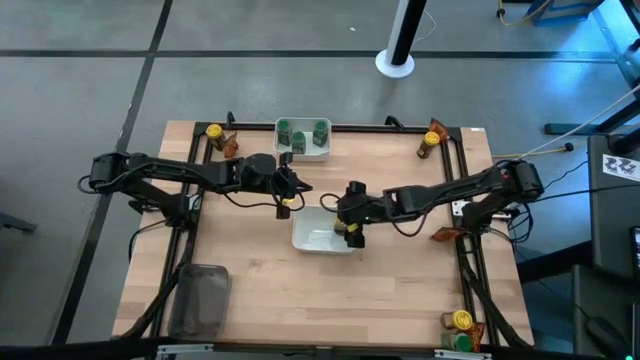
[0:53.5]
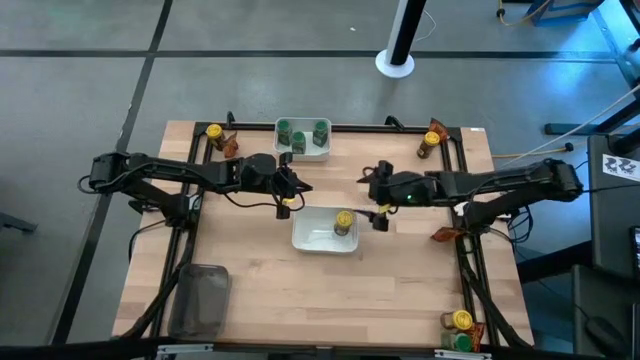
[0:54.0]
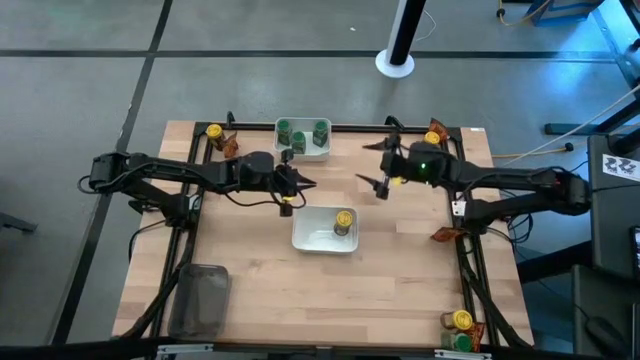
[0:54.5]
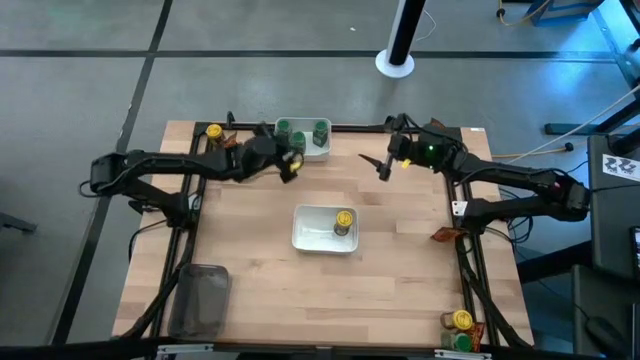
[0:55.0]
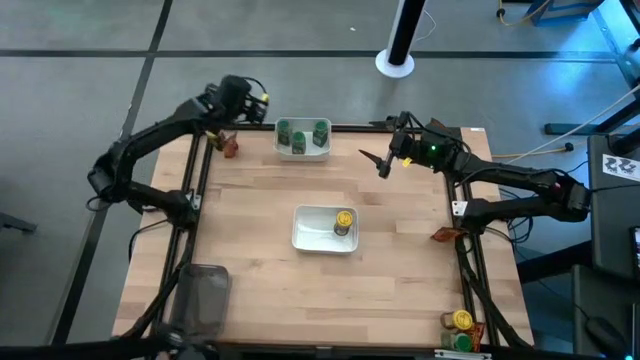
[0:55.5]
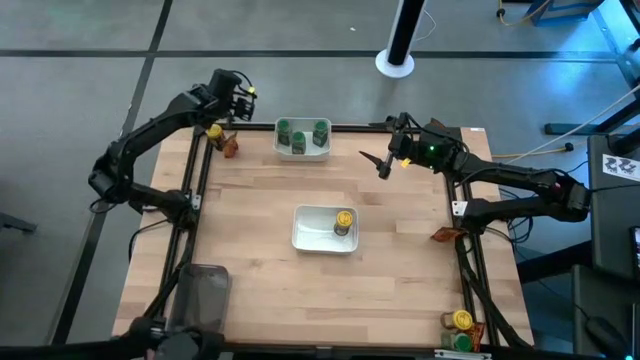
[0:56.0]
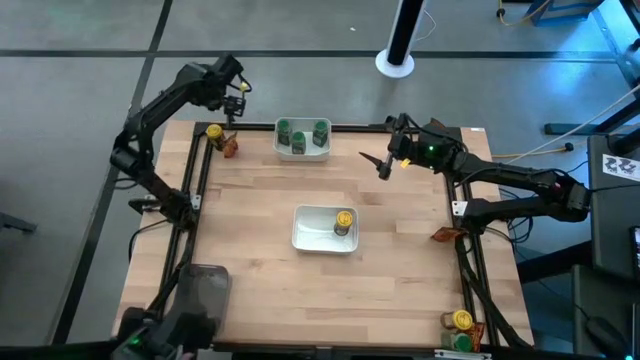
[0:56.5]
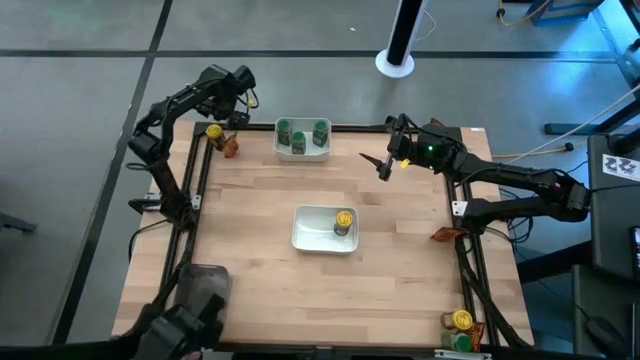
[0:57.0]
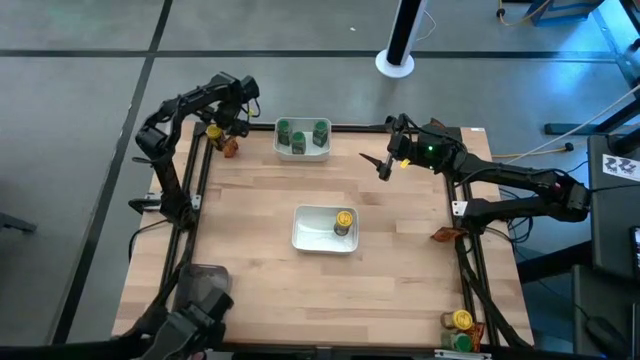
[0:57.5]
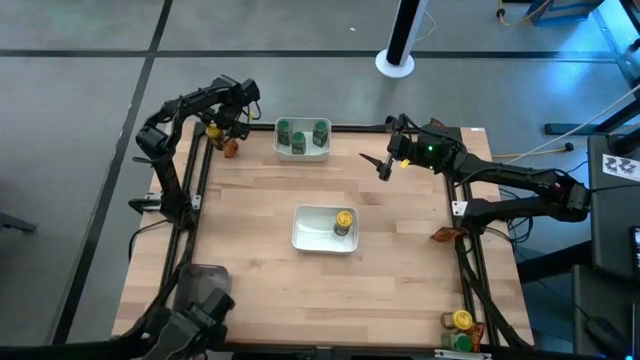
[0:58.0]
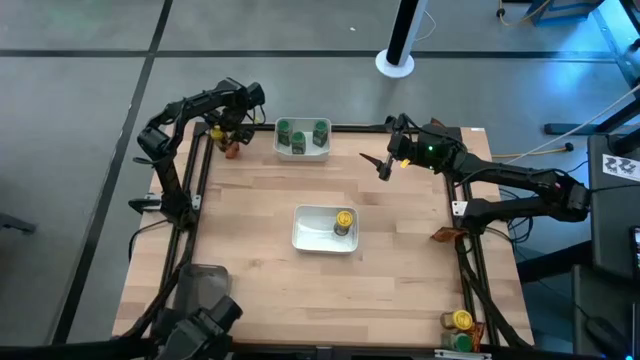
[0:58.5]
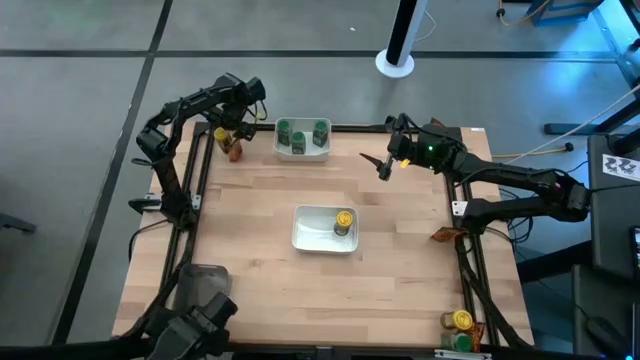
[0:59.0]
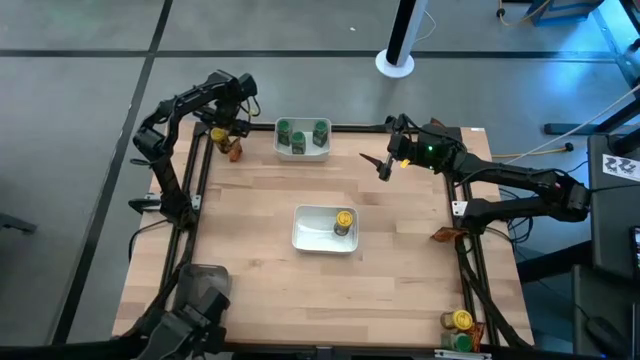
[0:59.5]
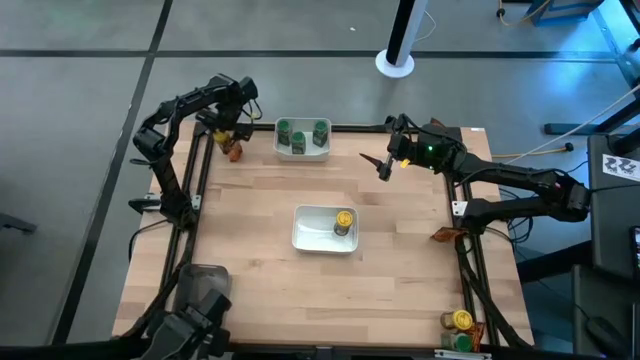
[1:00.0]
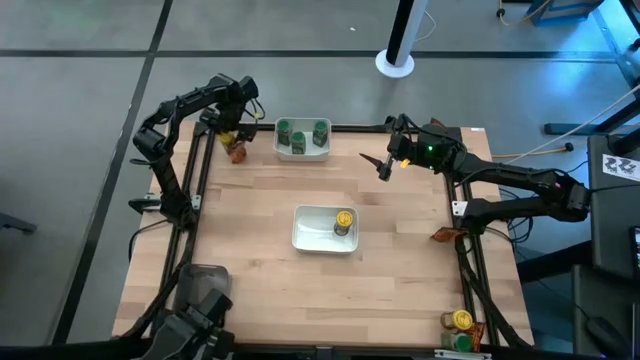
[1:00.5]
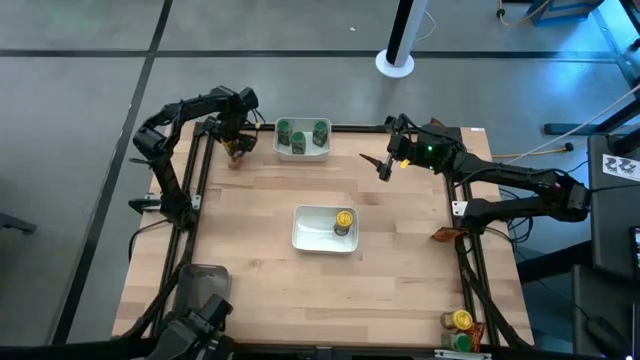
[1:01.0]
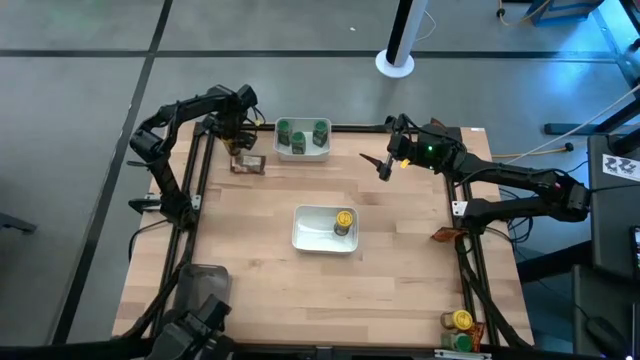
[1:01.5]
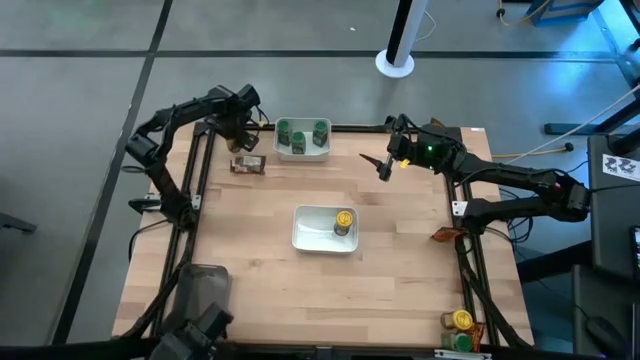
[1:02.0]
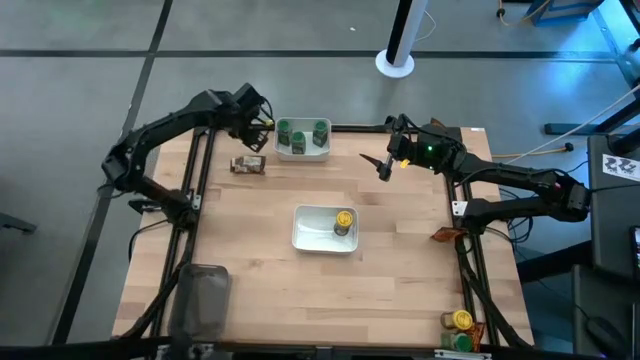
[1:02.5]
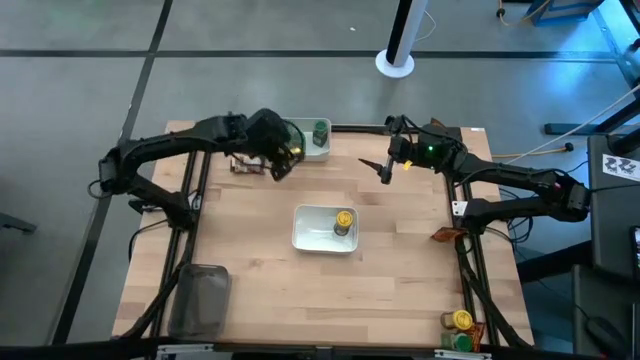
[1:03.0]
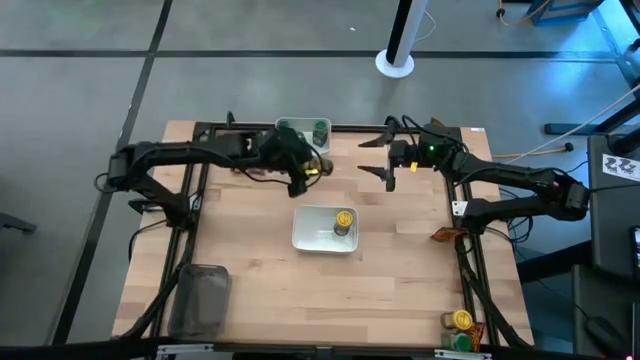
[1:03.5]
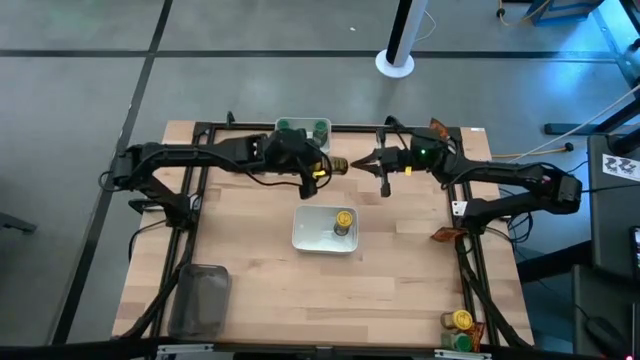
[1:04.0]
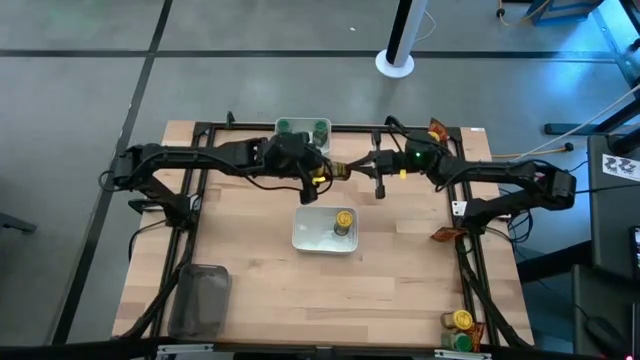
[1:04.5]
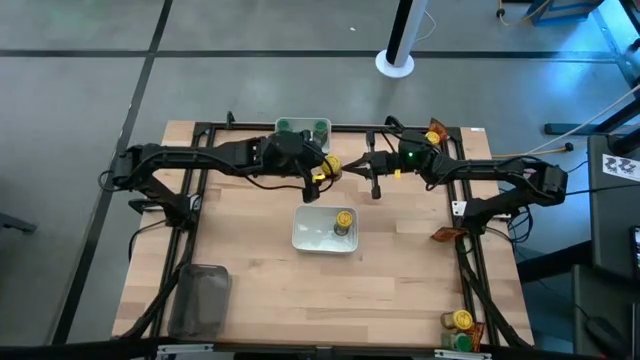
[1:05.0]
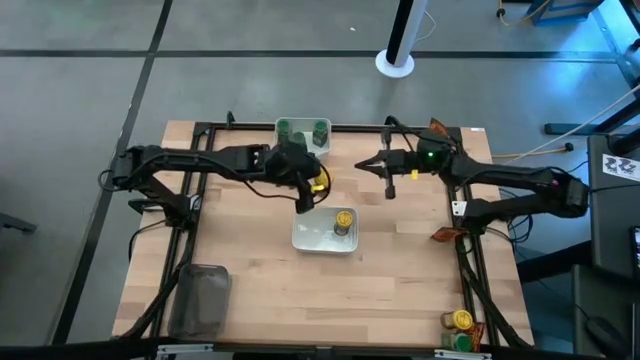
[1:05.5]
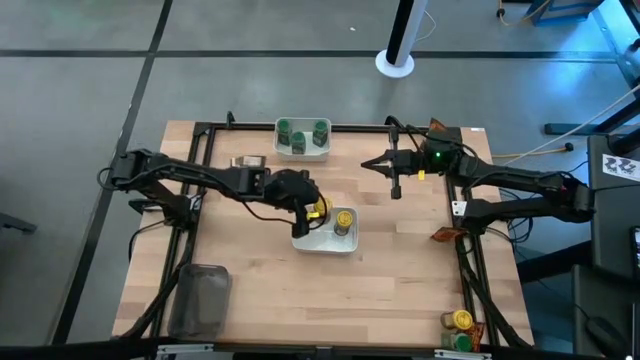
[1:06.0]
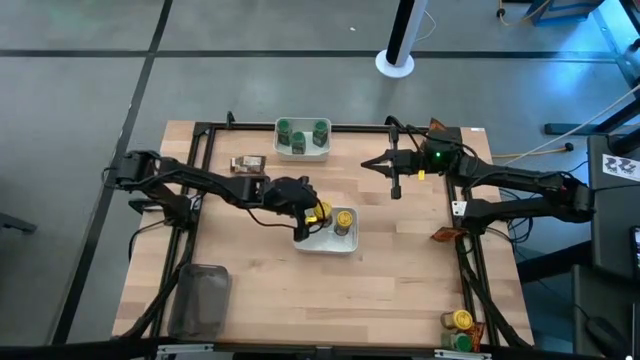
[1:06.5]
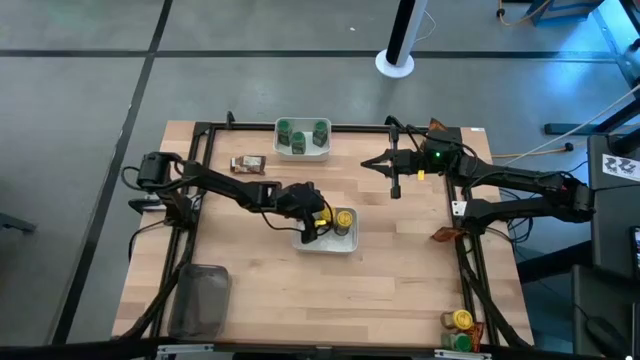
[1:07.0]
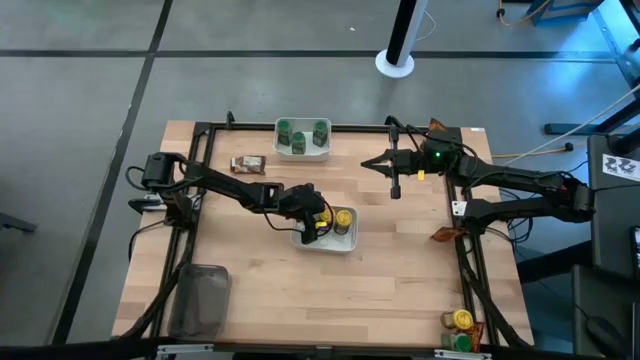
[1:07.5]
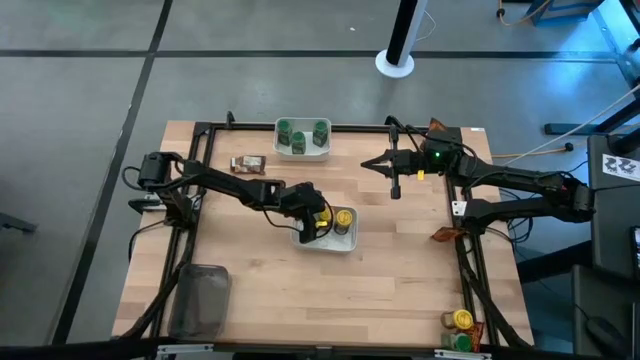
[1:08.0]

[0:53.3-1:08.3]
Task: Sort spices by type
Put the top left yellow seasoning bottle into the bottom white bin

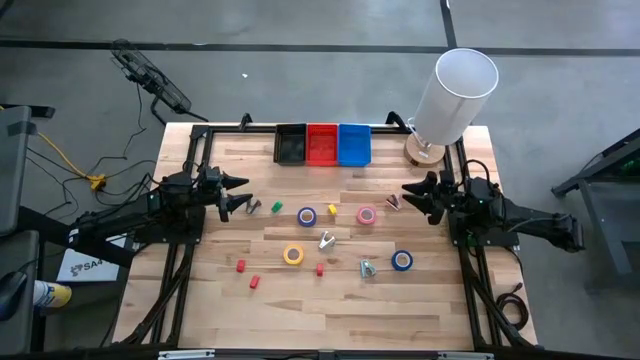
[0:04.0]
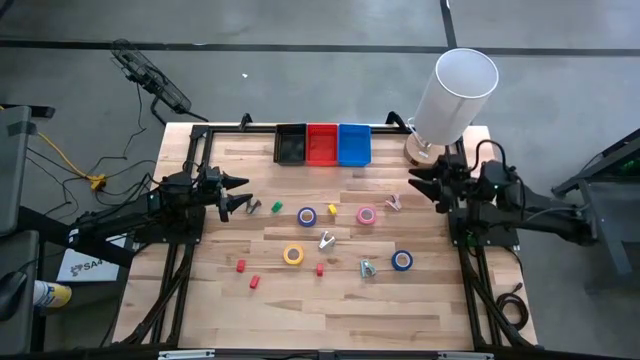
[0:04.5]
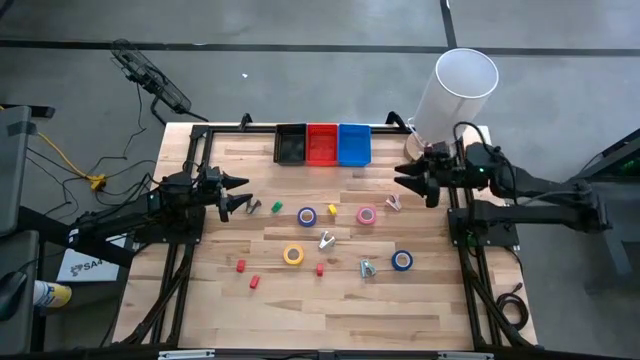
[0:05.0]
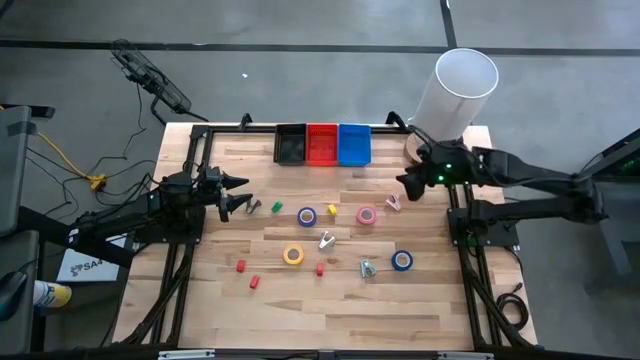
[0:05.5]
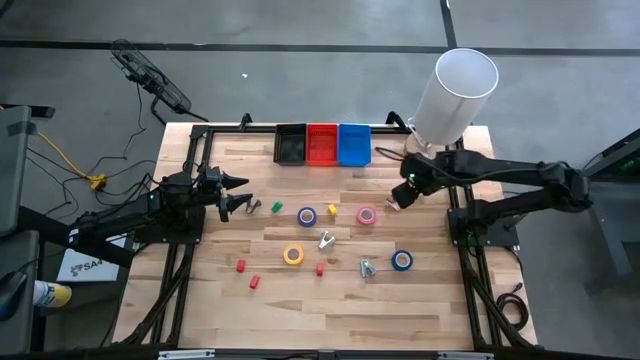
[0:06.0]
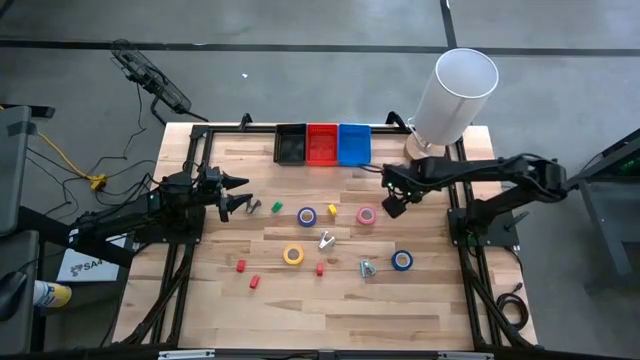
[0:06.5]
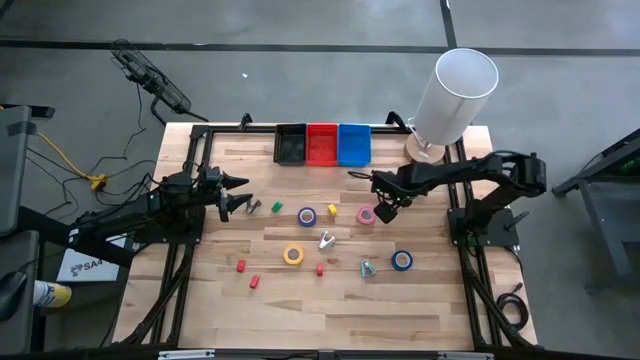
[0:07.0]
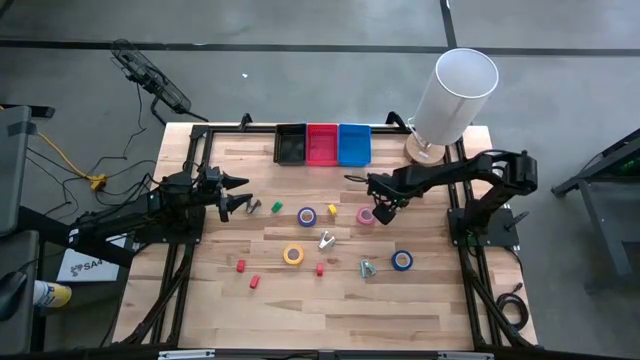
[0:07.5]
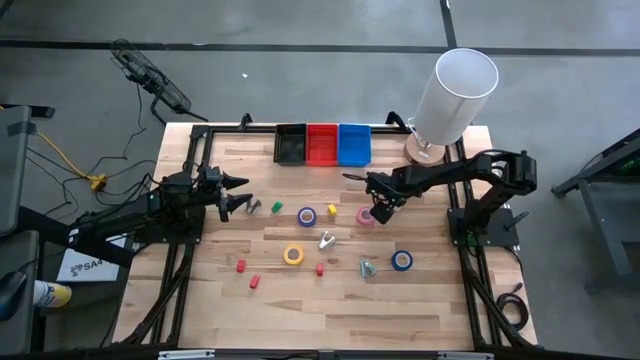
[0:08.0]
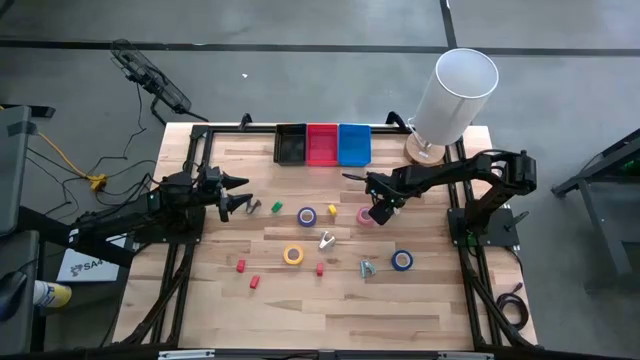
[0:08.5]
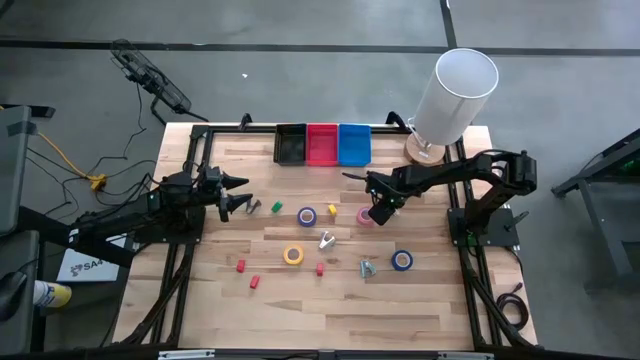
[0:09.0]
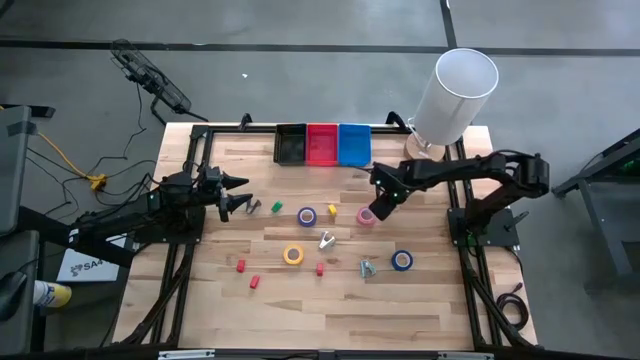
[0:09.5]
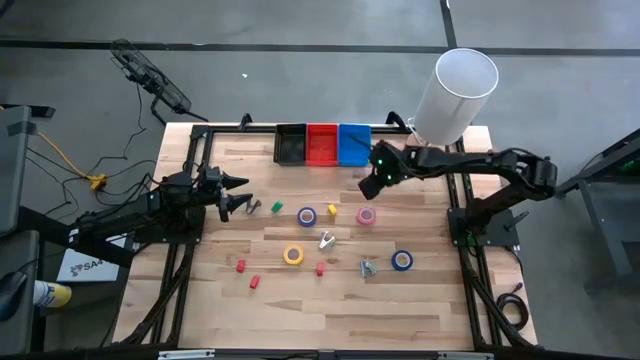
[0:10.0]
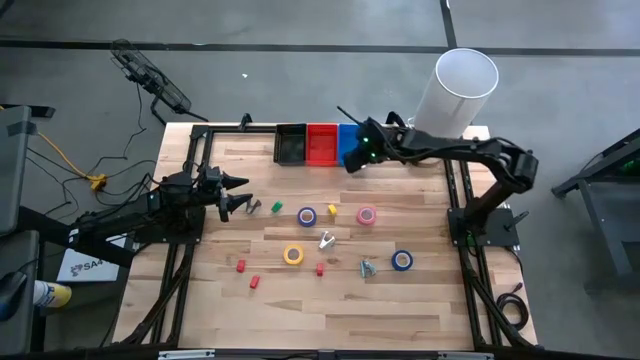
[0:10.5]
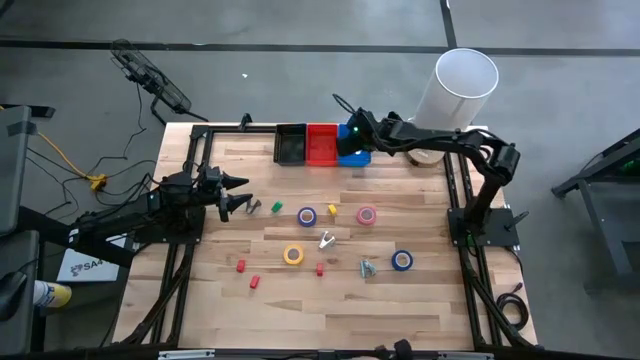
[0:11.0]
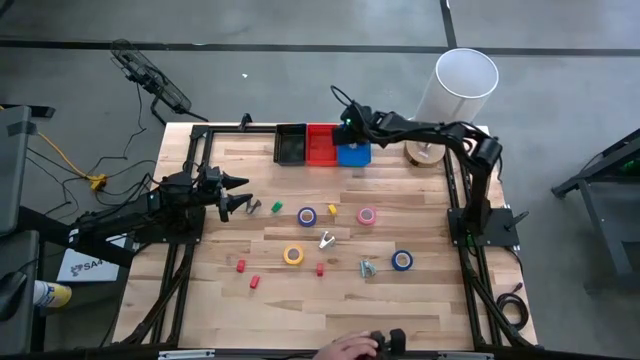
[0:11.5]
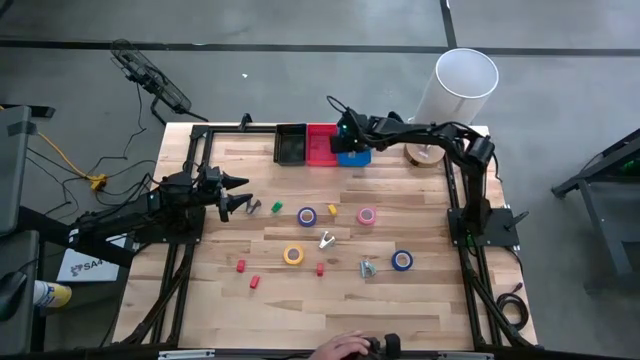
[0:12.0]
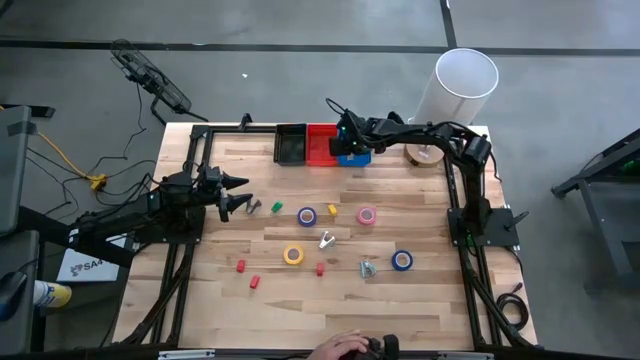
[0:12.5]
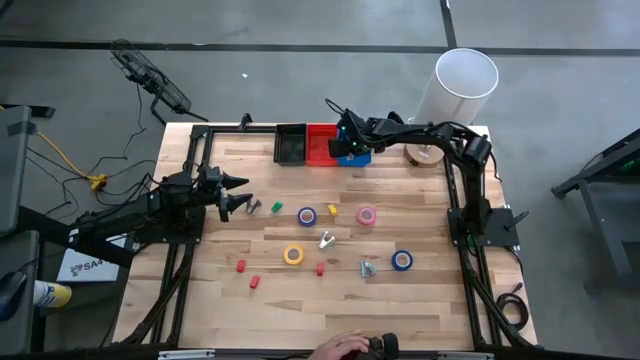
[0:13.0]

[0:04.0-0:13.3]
Task: Pick and place Stapler, Stapler remover, tape
Put the pink staple remover into the blue bin
